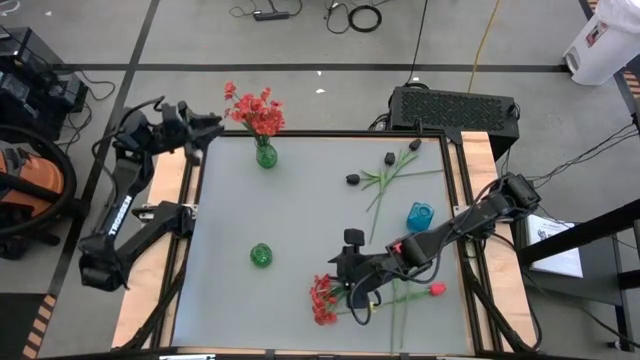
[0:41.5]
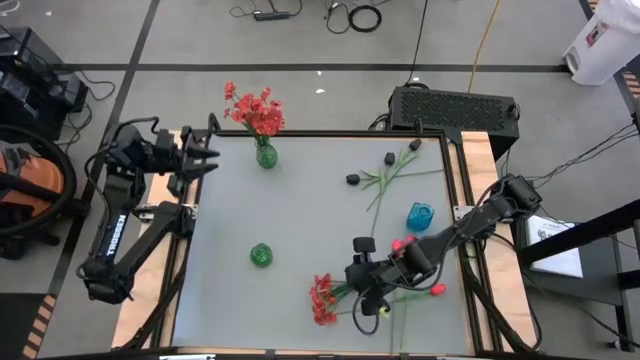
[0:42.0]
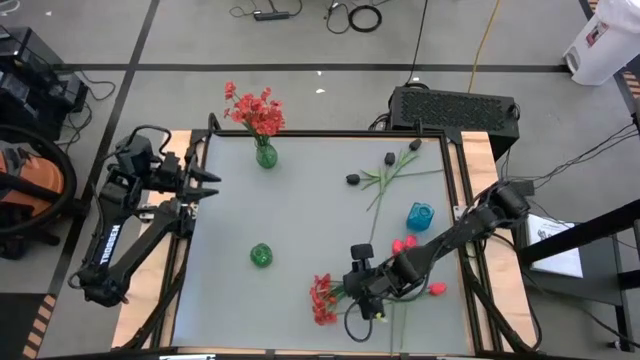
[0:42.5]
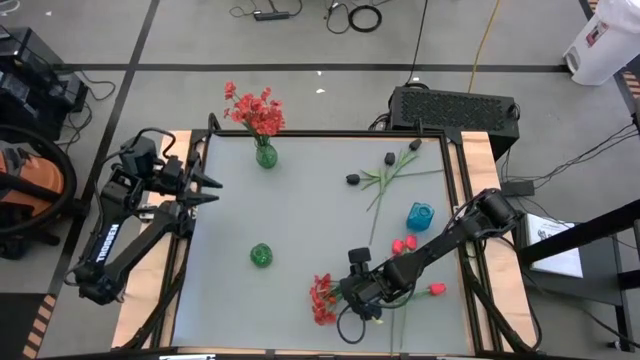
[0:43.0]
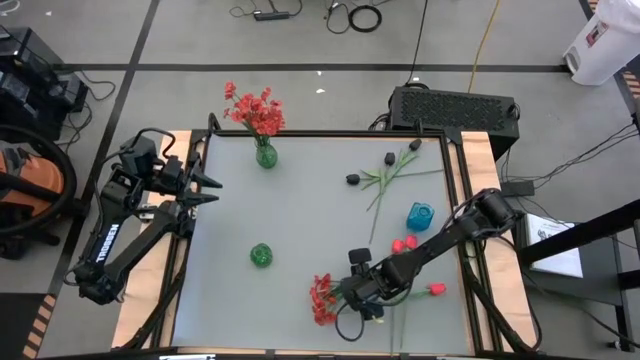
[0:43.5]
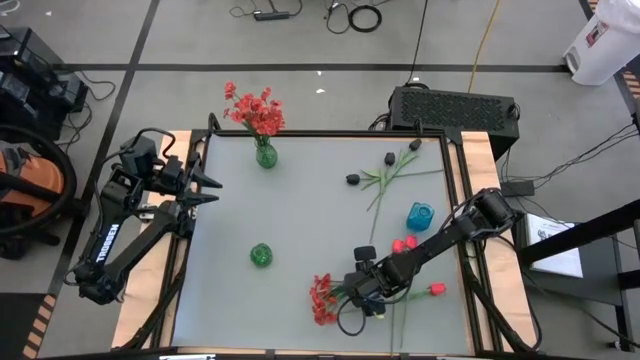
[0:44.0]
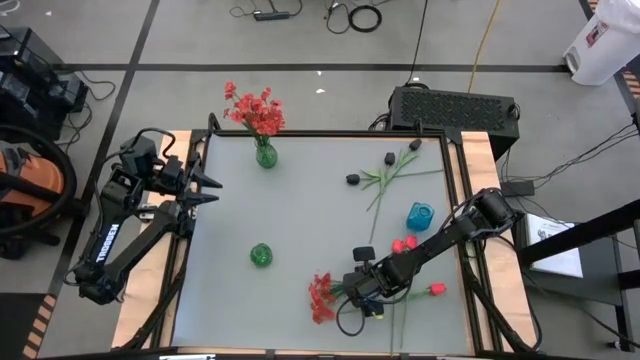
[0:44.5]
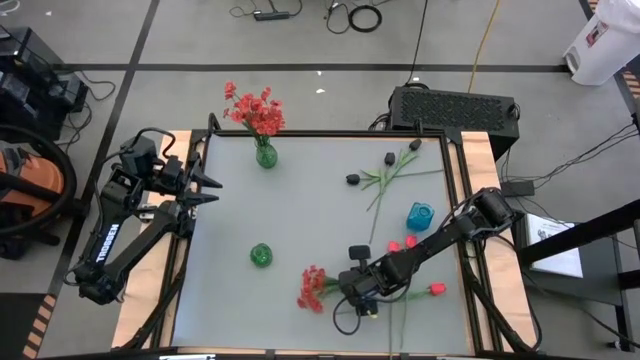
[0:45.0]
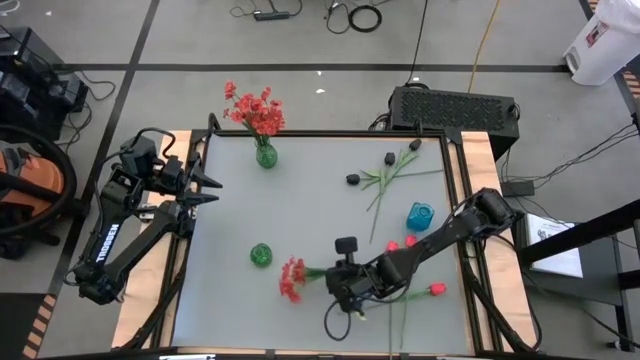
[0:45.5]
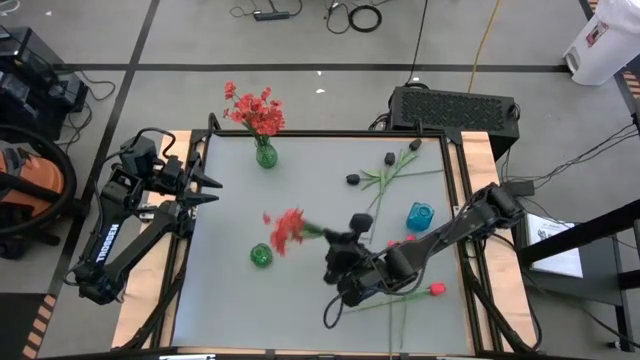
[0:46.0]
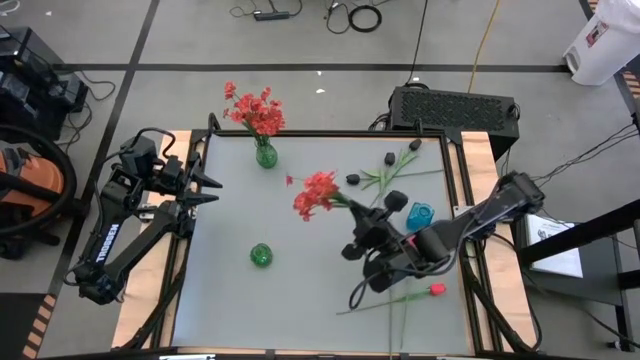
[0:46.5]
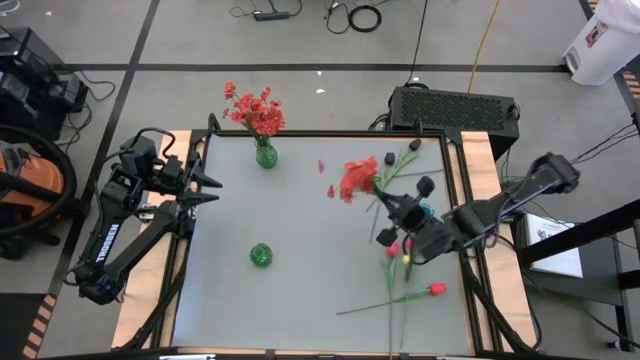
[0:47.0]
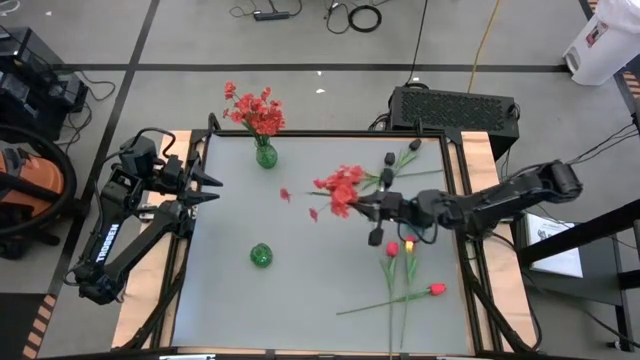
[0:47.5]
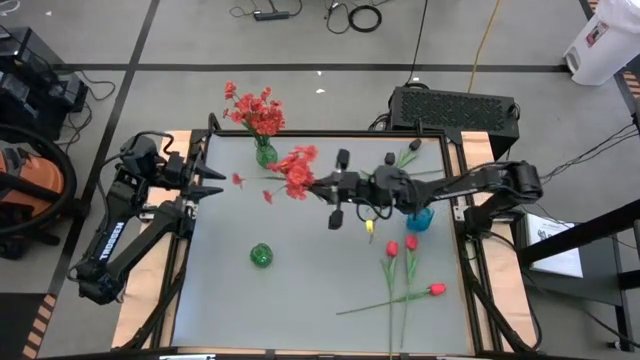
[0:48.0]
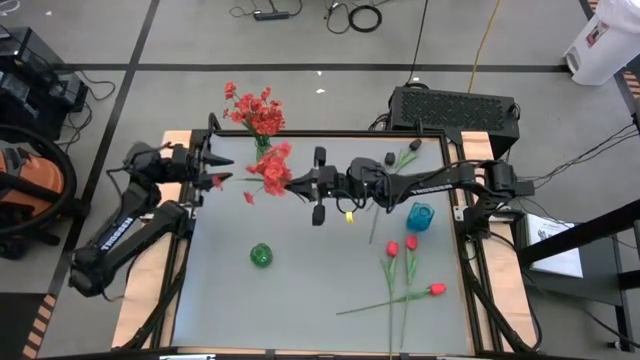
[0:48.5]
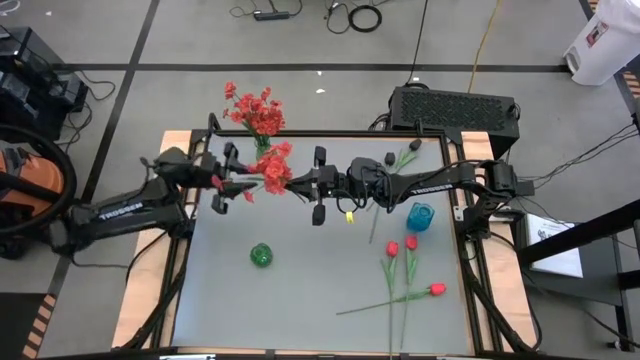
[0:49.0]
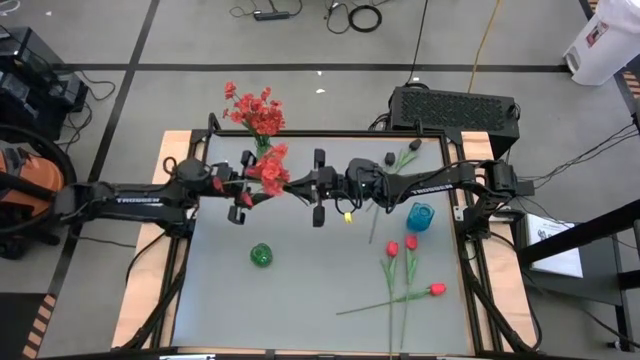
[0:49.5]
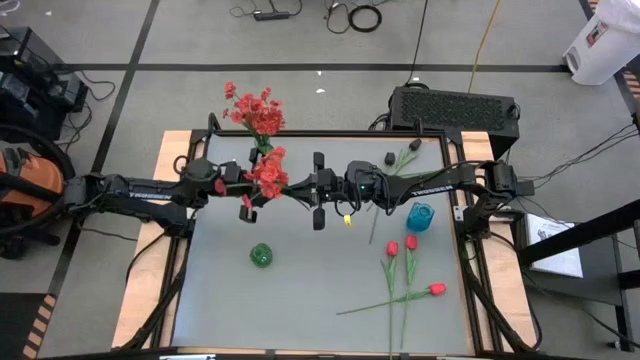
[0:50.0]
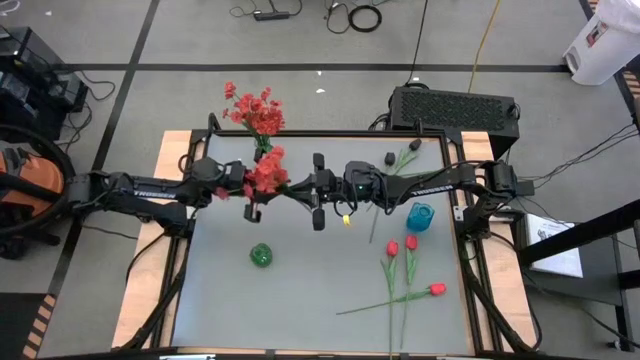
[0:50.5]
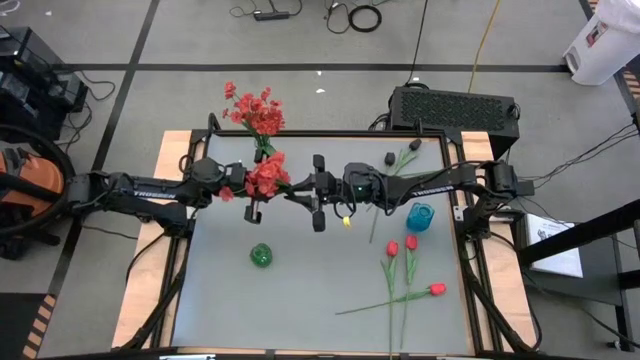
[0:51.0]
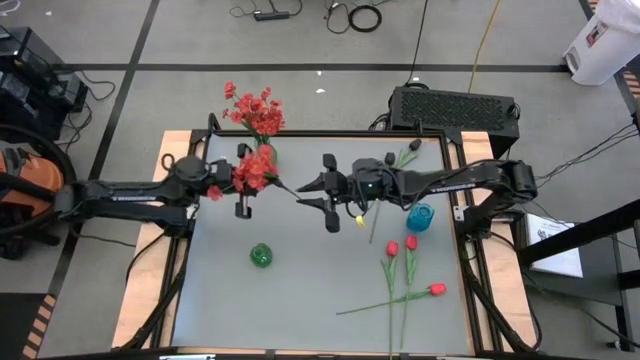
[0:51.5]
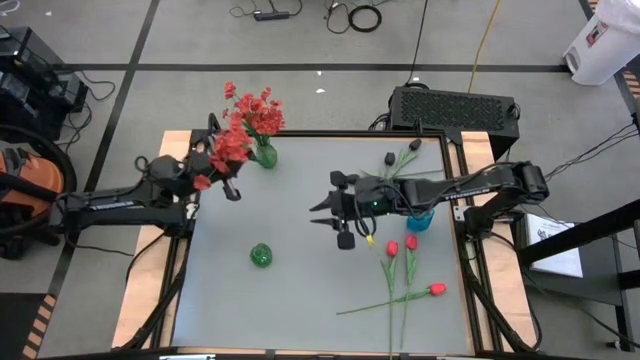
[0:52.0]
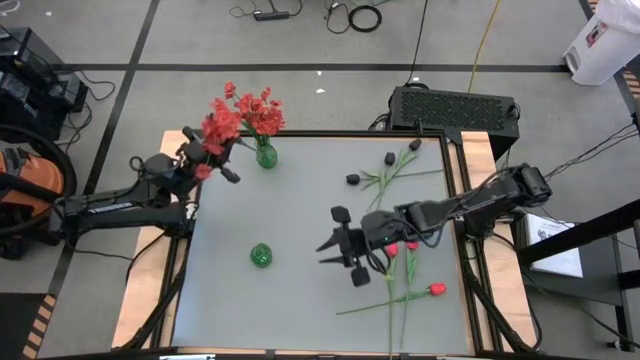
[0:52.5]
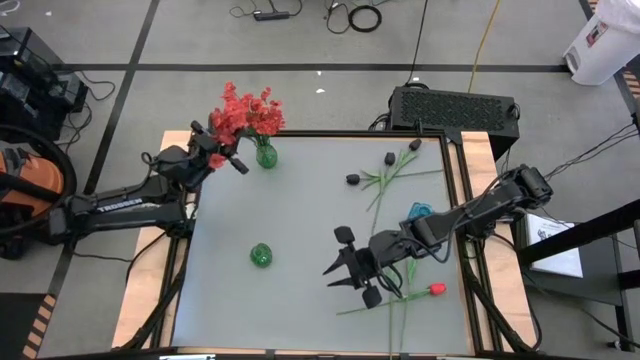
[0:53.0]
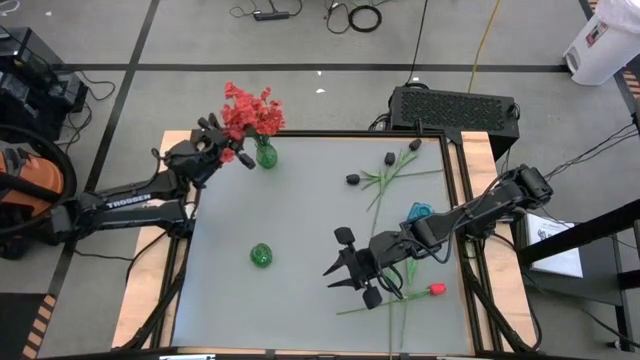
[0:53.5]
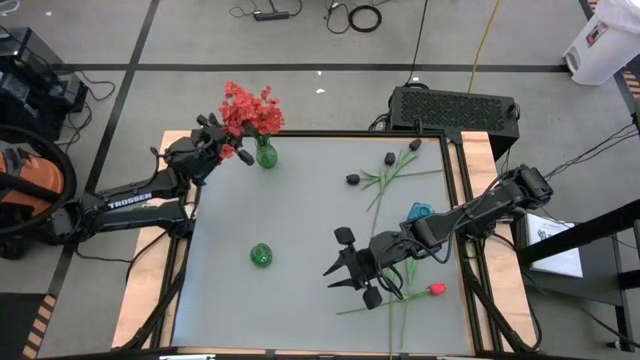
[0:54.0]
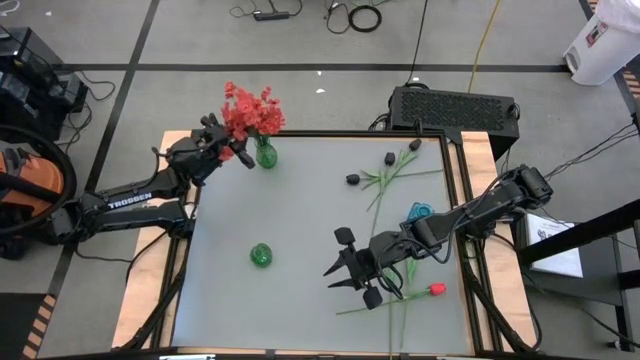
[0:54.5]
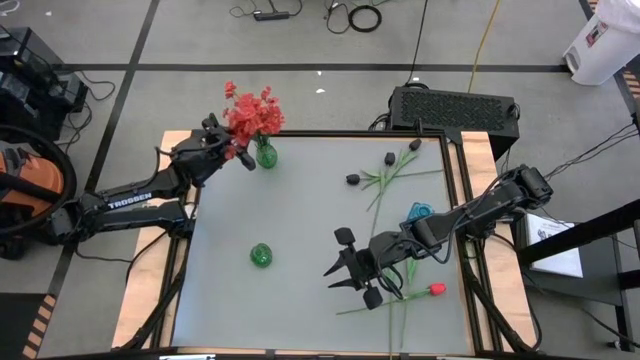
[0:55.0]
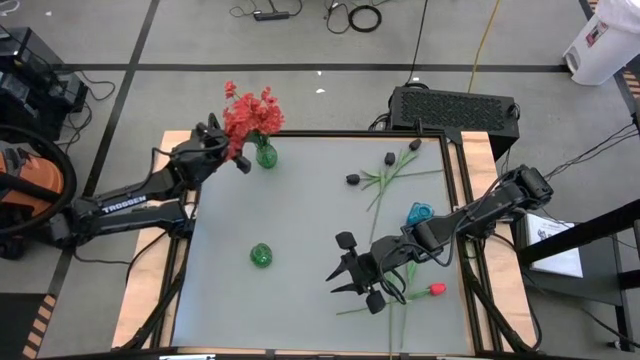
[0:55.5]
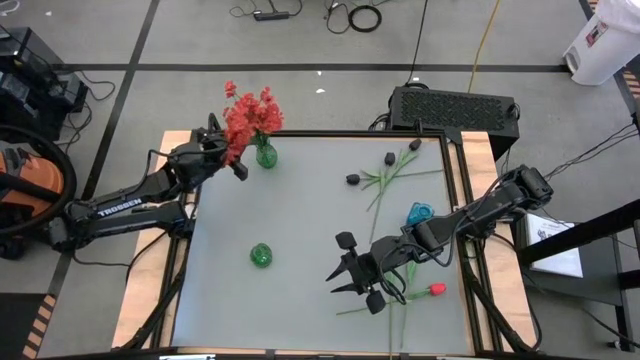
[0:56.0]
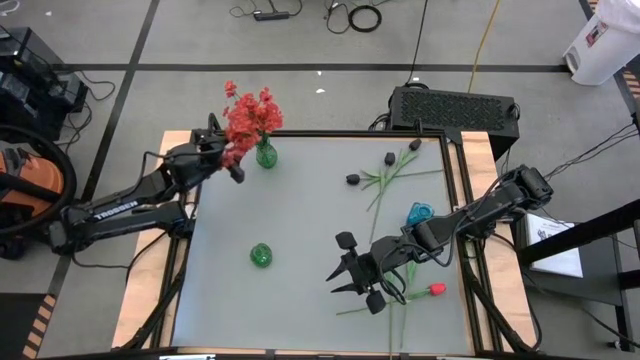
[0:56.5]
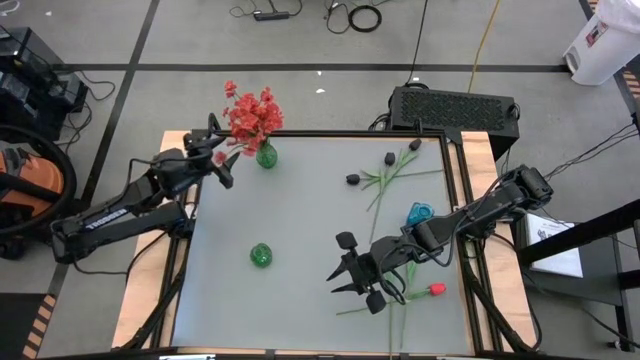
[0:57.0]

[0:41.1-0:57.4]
Task: Sort flowers into vase by color
Put the orange flowers into the top green vase

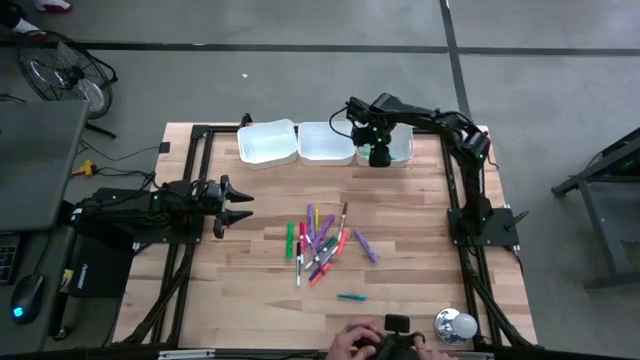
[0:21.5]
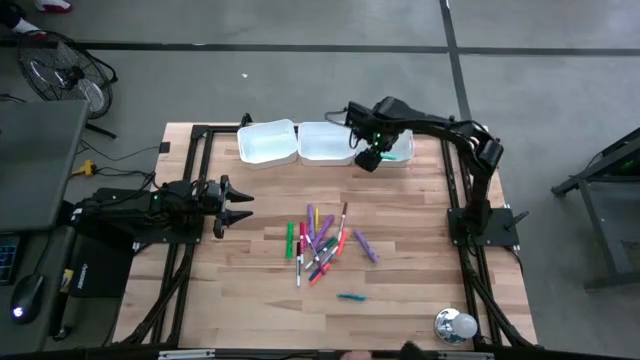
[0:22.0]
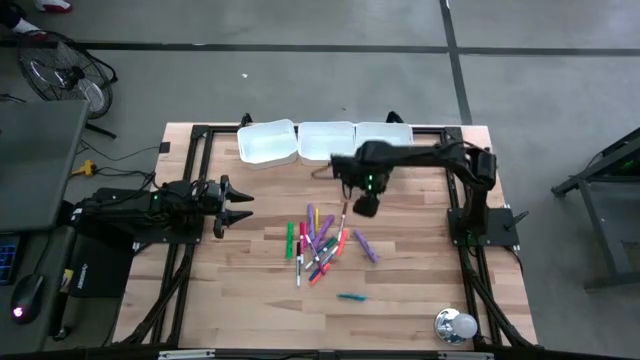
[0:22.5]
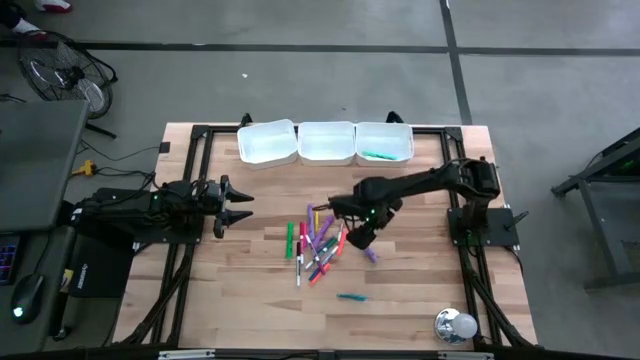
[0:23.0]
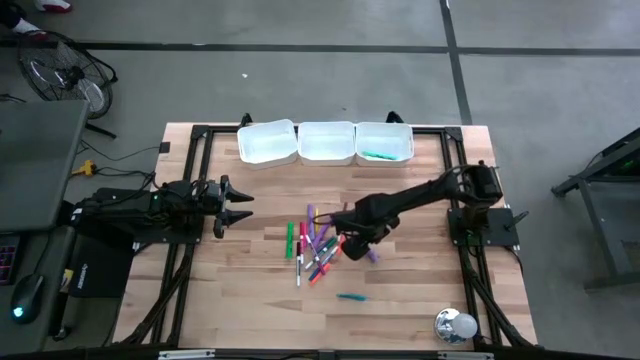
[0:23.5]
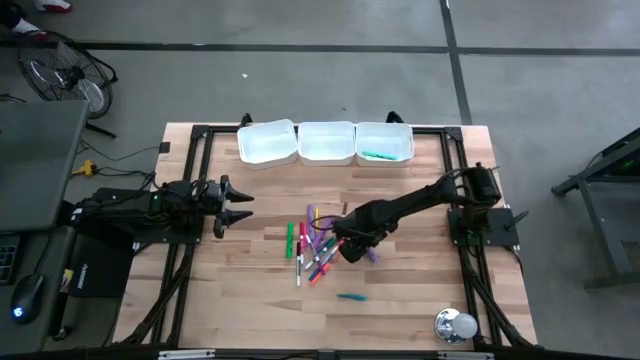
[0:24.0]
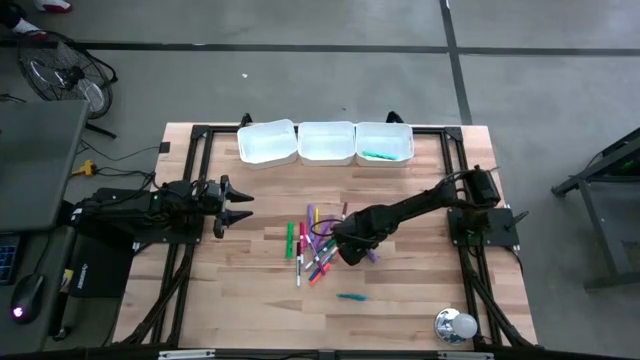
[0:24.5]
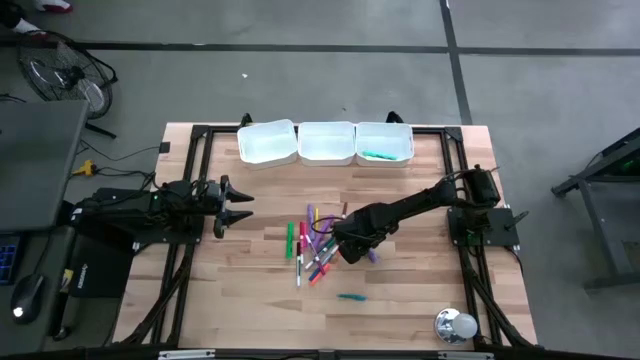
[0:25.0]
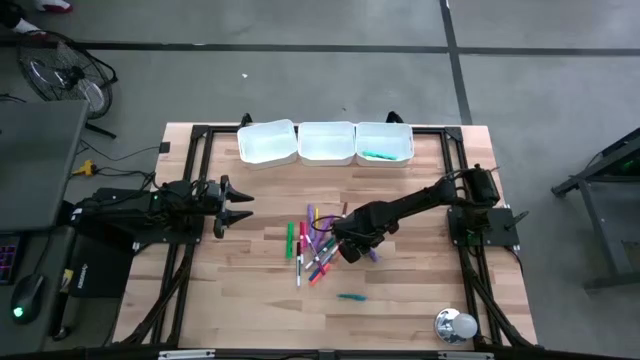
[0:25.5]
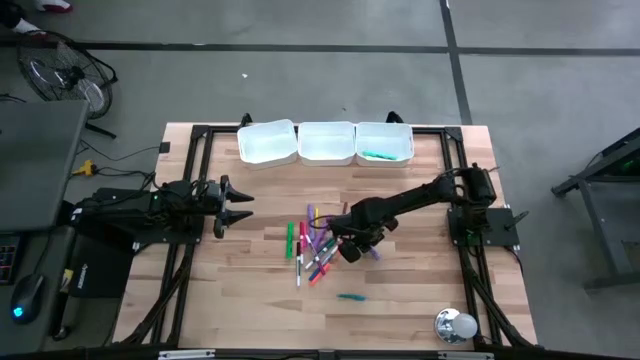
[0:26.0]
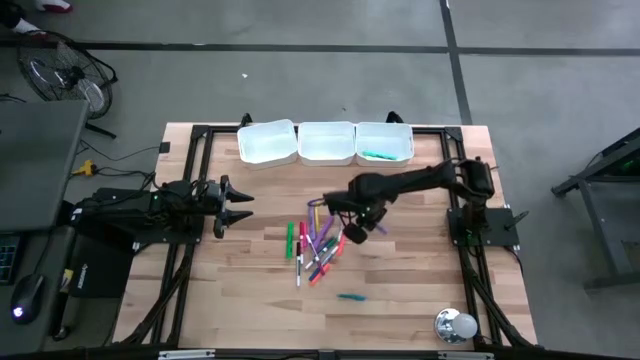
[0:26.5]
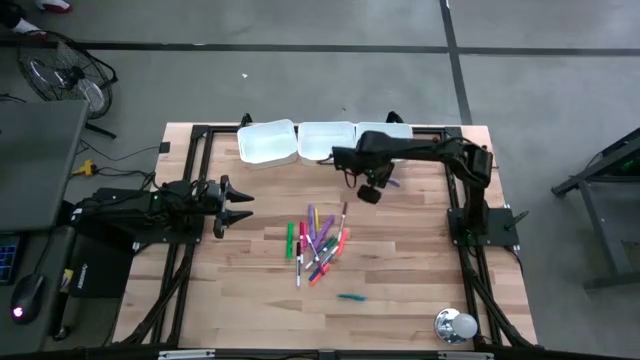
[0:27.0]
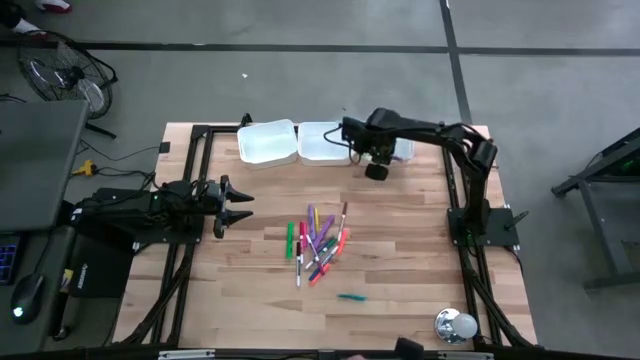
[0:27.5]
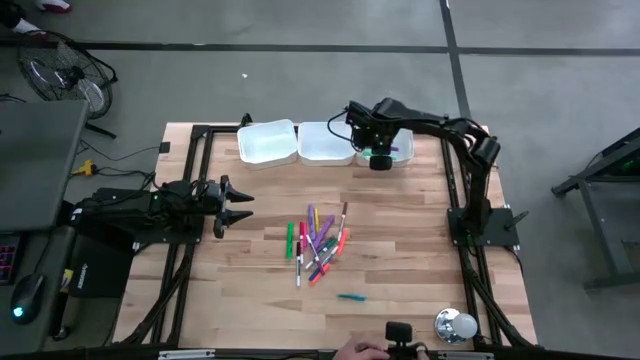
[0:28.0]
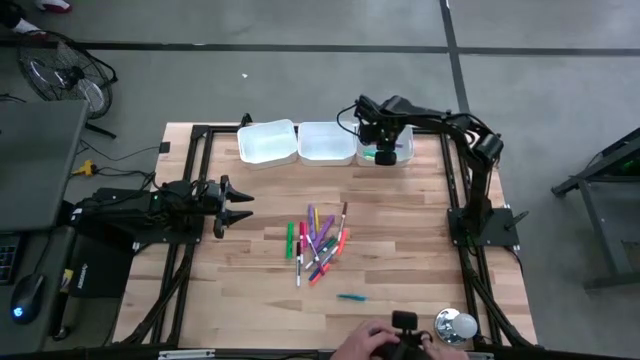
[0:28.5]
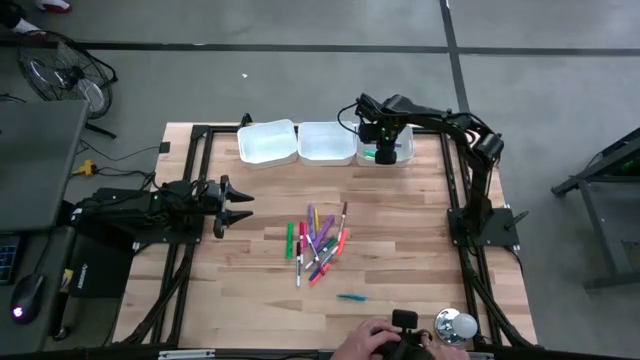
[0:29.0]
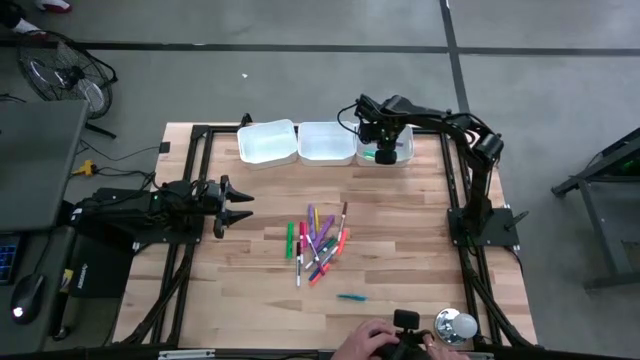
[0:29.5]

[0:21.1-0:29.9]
Task: Pick & Place Markers
Put the right purple highlighter pen into the right white bin
